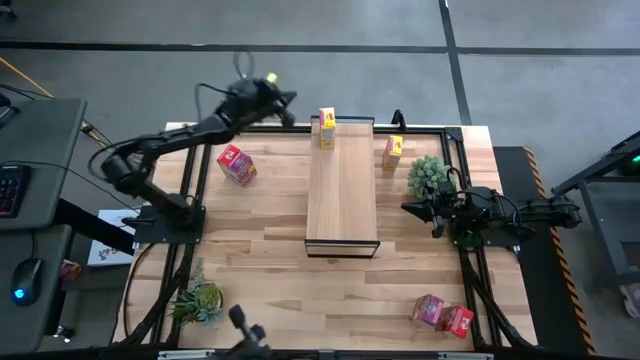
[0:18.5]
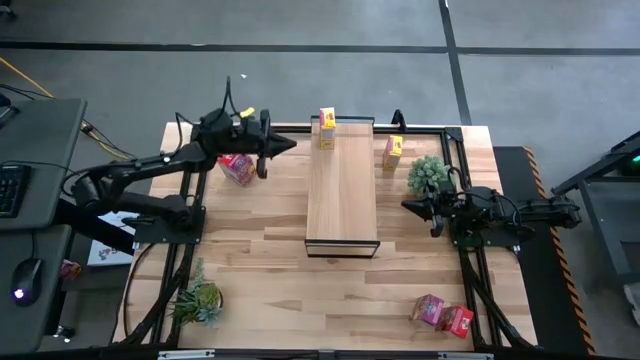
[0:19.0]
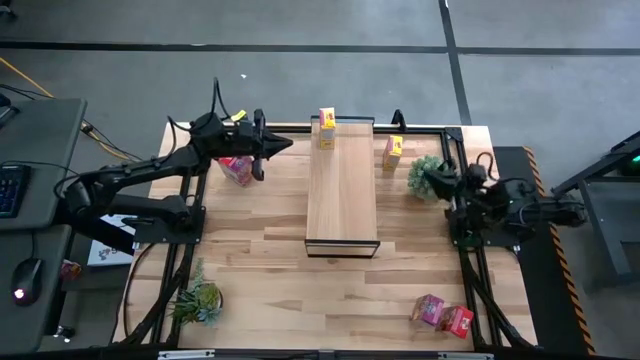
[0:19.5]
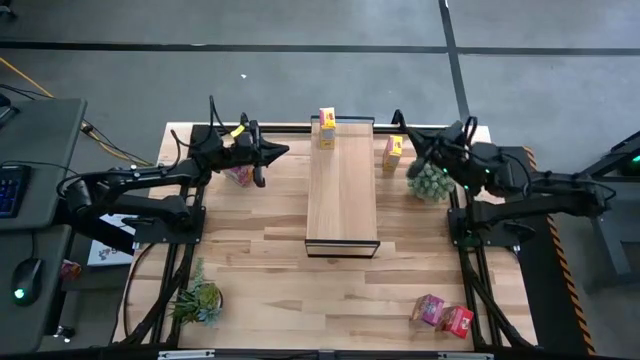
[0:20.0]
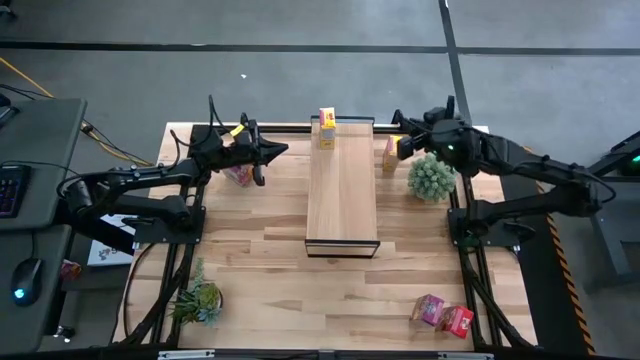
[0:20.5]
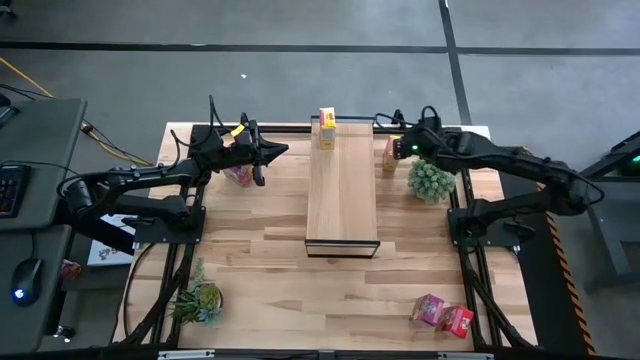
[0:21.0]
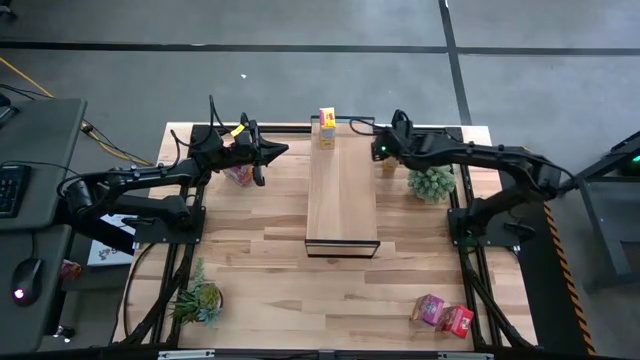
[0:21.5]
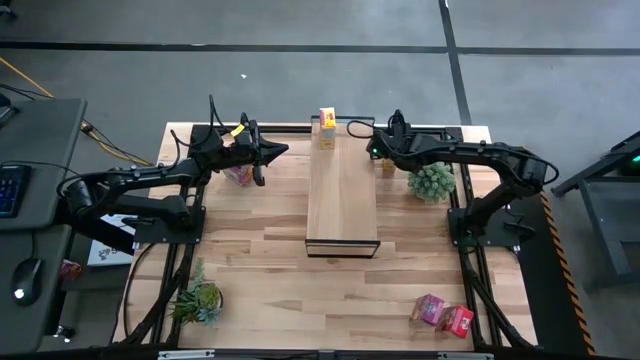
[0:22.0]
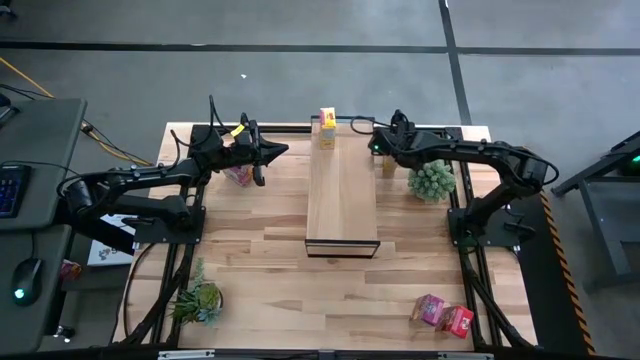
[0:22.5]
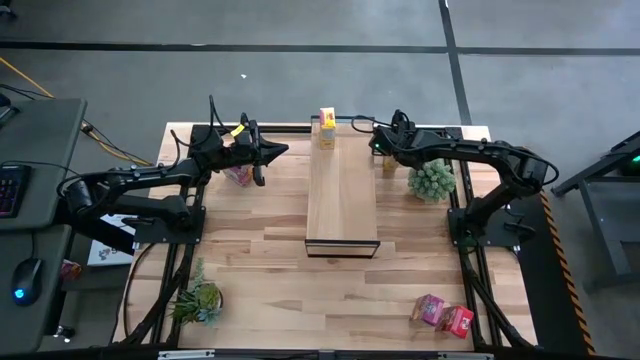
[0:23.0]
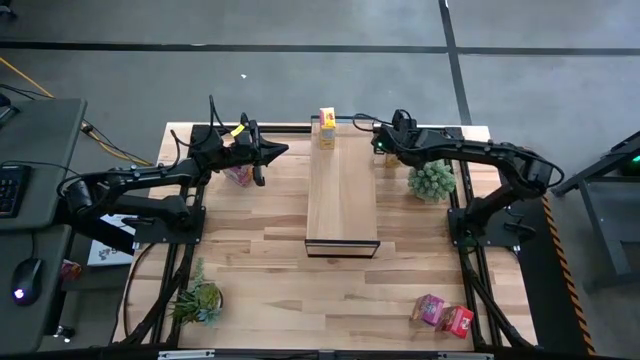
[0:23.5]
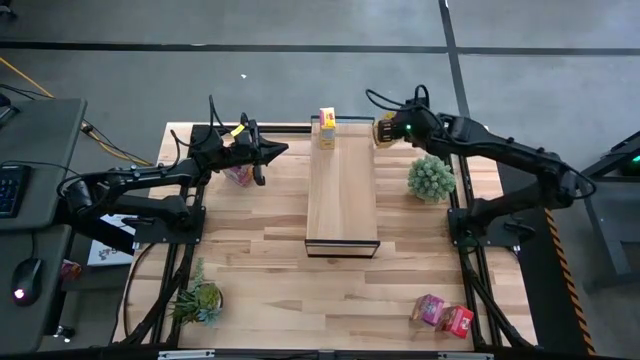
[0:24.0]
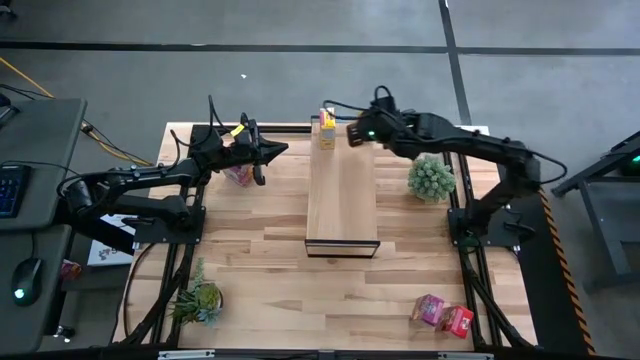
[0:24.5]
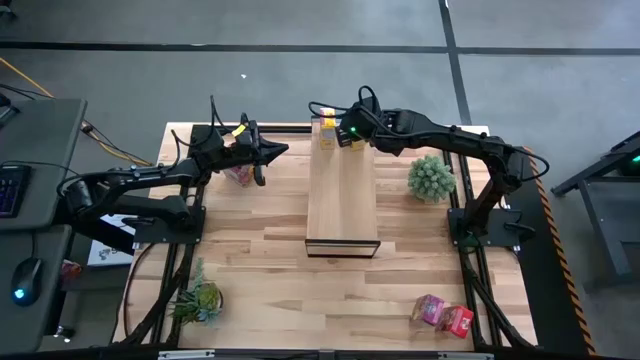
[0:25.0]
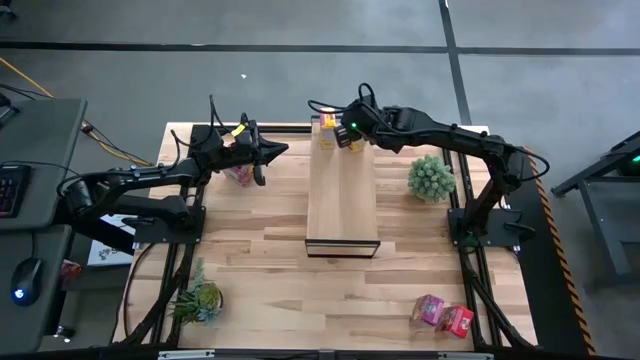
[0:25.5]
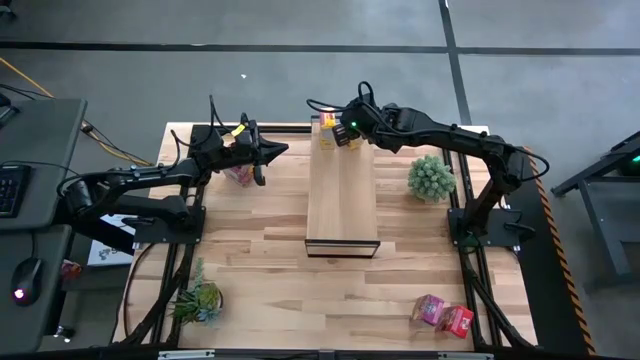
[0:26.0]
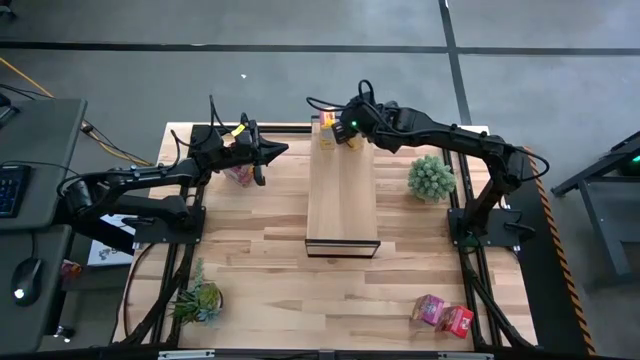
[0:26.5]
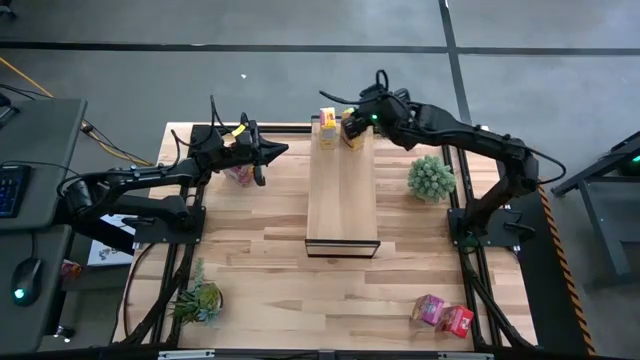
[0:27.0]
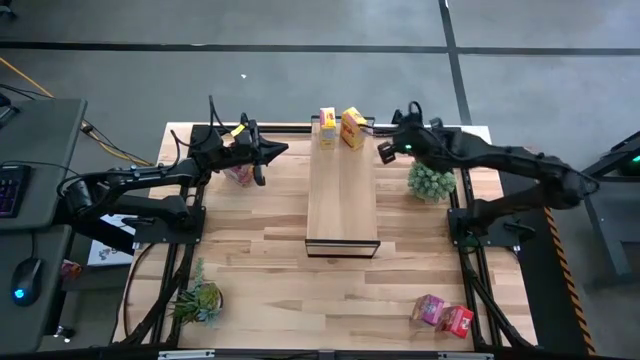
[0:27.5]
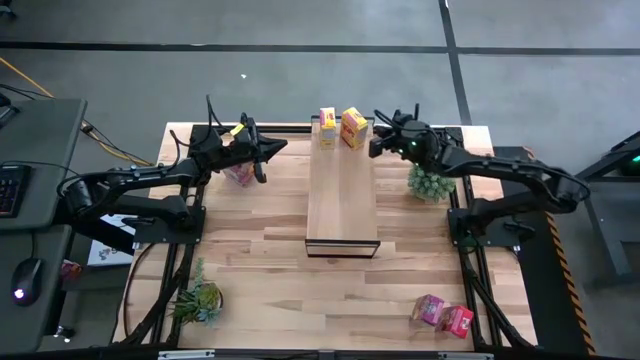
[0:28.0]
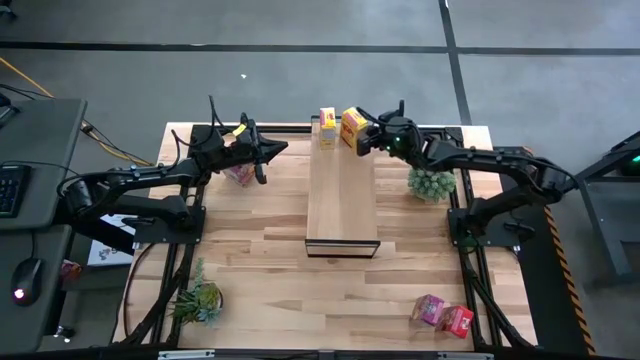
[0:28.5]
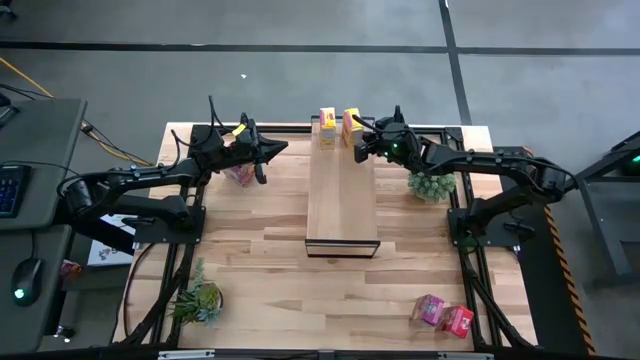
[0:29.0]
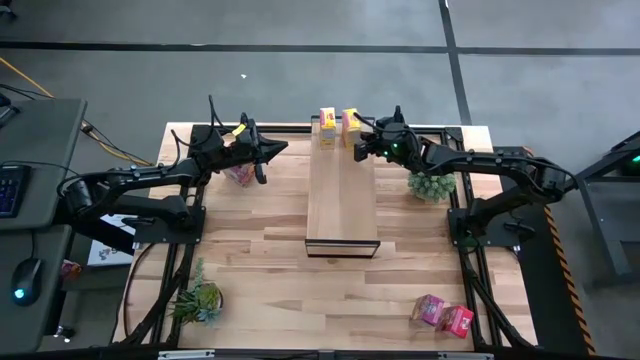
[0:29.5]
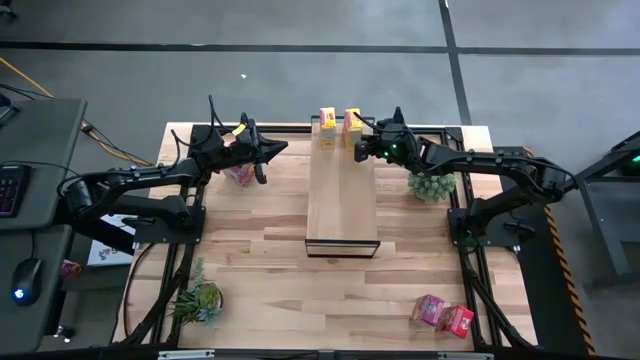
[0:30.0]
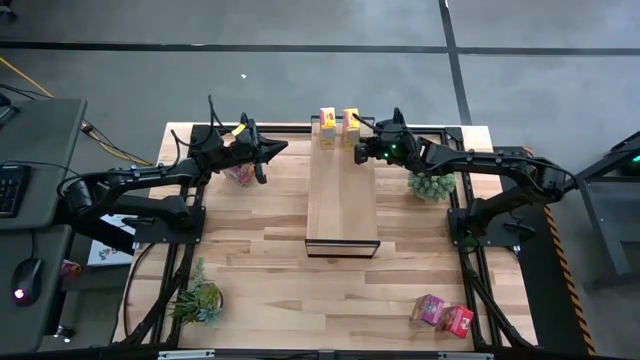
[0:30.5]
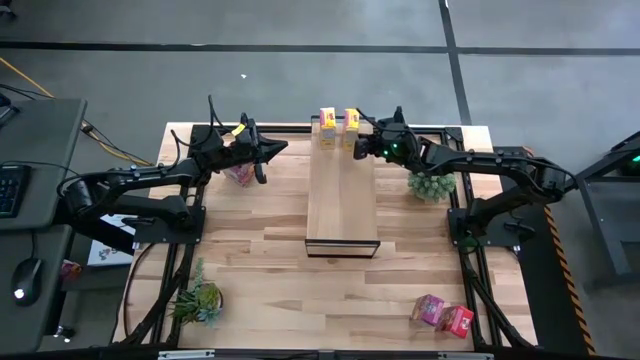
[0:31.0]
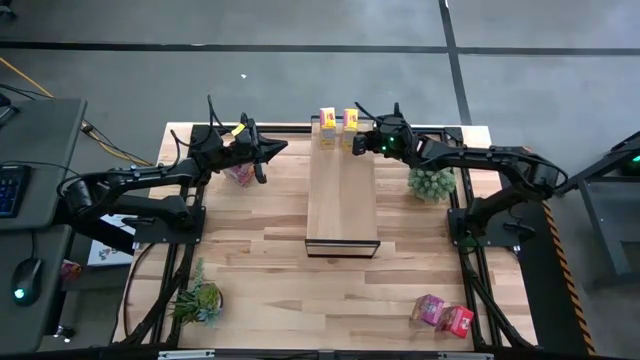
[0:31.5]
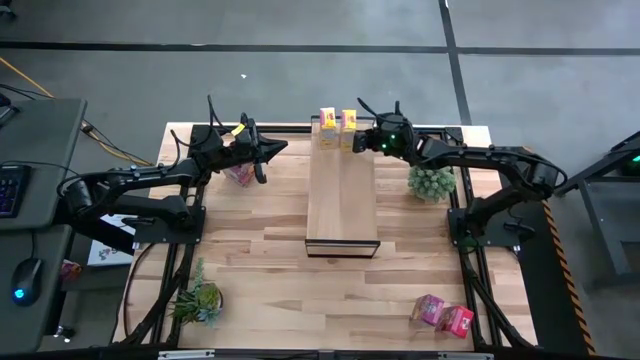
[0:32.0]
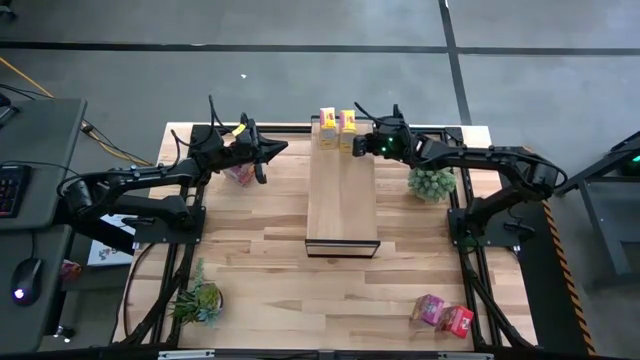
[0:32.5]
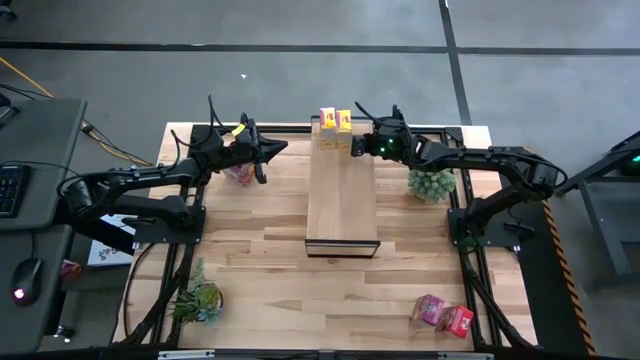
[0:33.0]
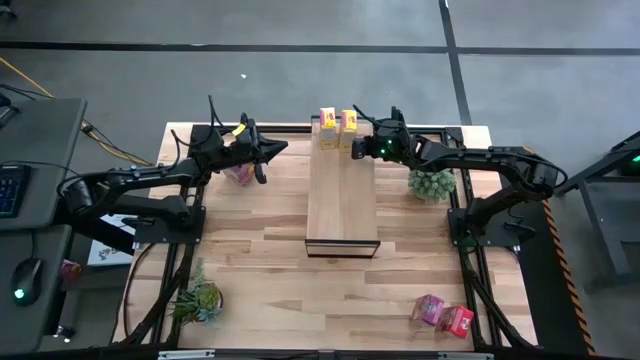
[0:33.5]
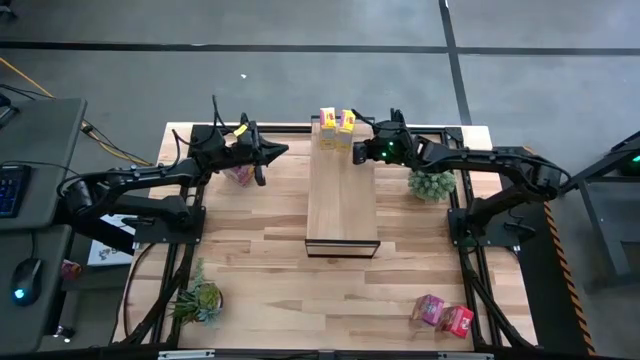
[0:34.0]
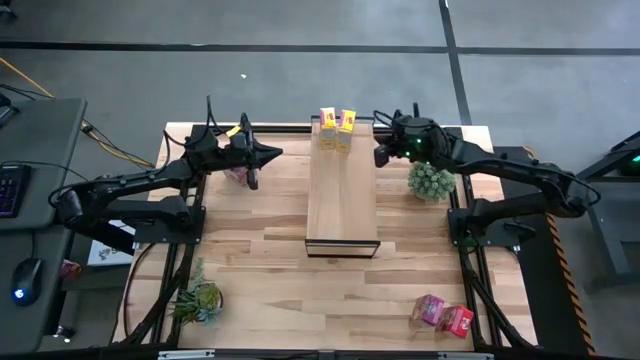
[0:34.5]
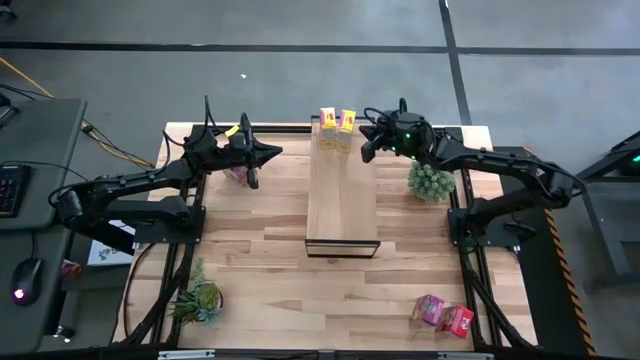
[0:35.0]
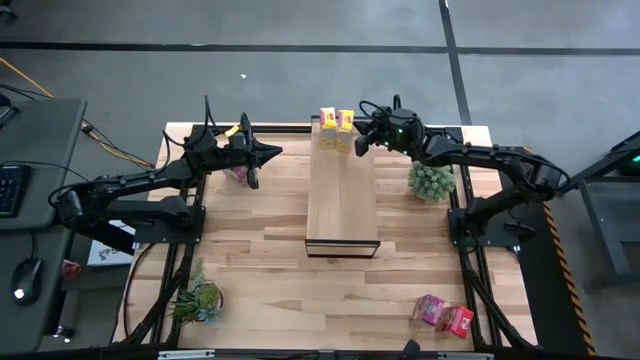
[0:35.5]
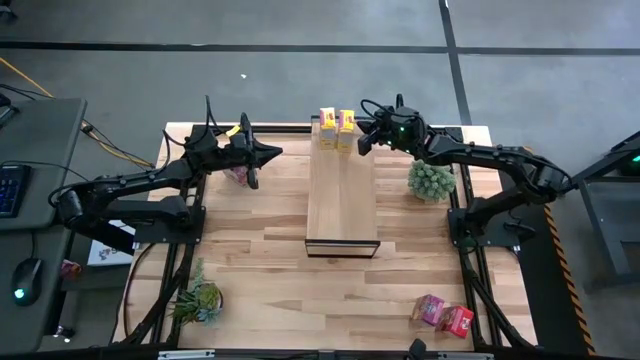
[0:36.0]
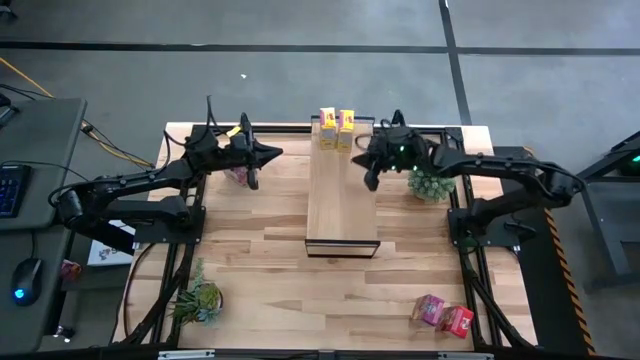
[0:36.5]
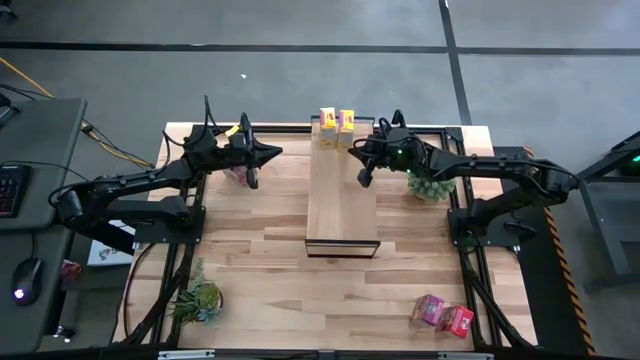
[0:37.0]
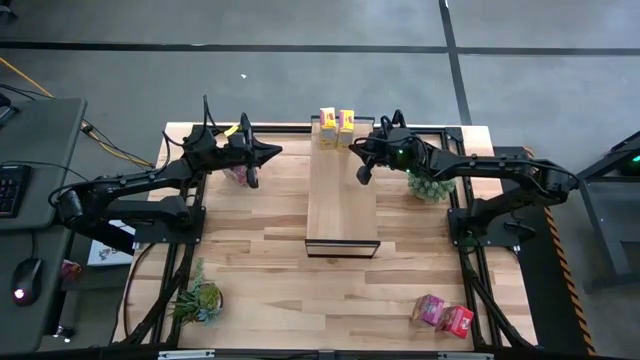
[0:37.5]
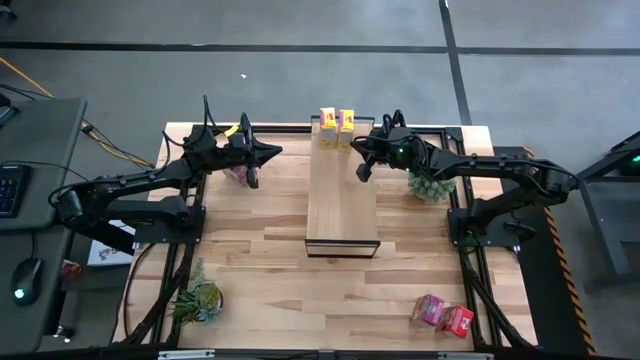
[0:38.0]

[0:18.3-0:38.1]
Task: Stack cereal on shelf
Put the yellow cereal box on the shelf
